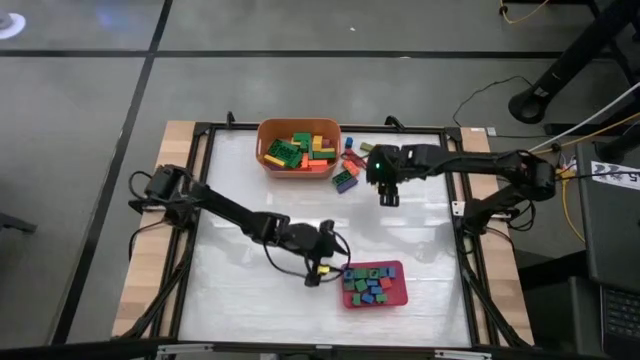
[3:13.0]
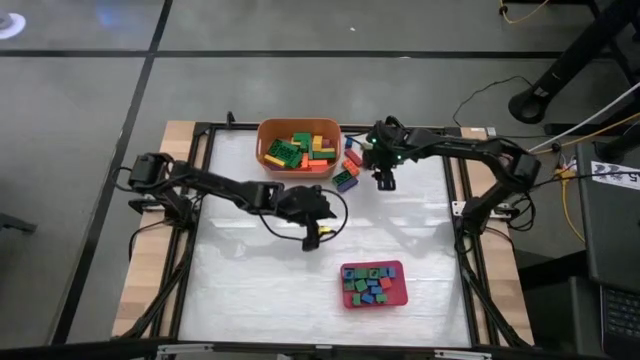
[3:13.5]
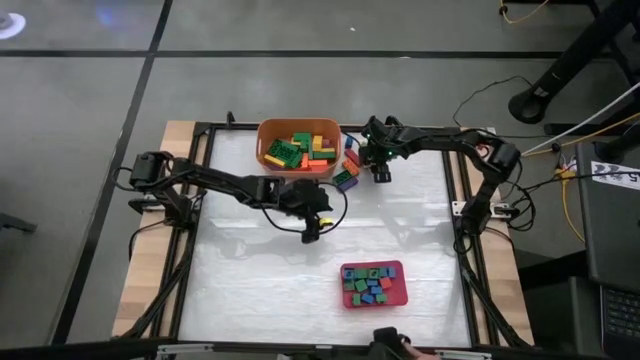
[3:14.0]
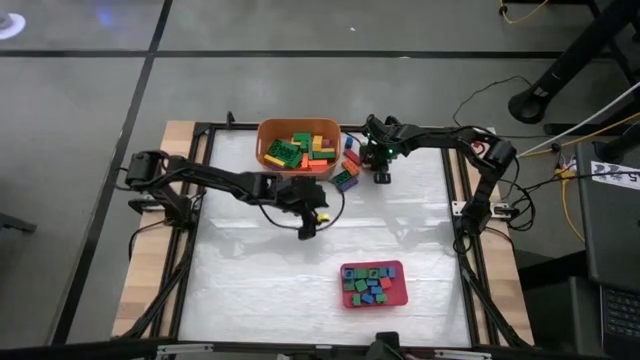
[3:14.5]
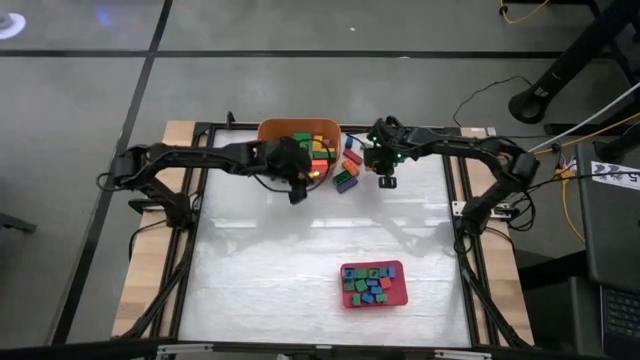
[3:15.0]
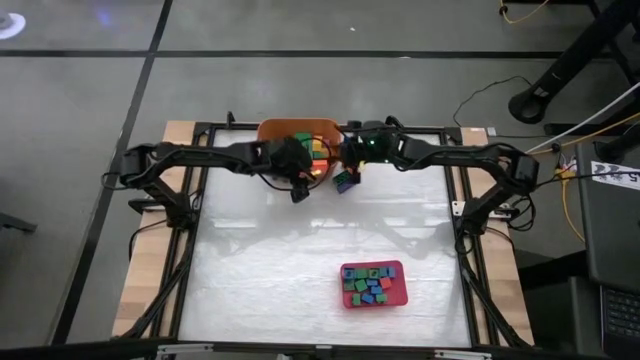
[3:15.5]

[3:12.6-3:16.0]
Task: Sort blocks by size
Put the large orange block into the orange bin

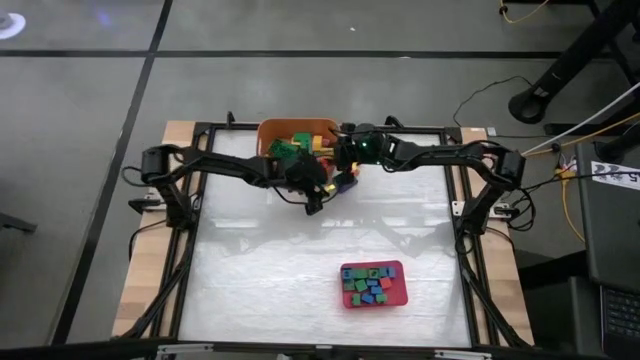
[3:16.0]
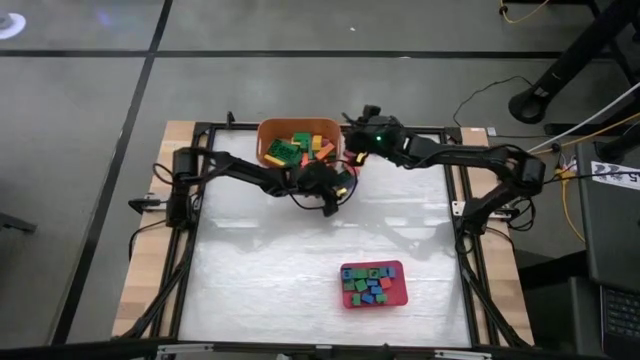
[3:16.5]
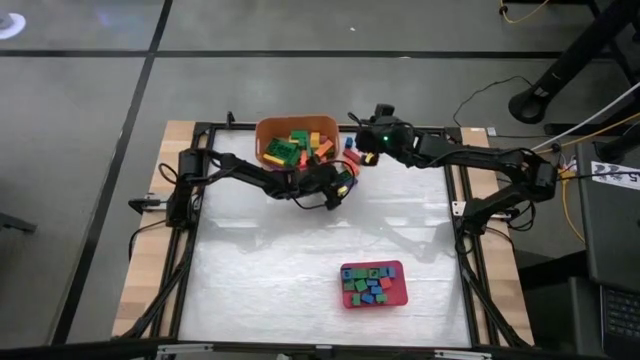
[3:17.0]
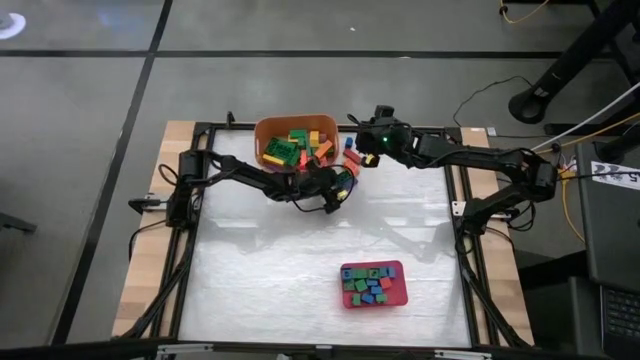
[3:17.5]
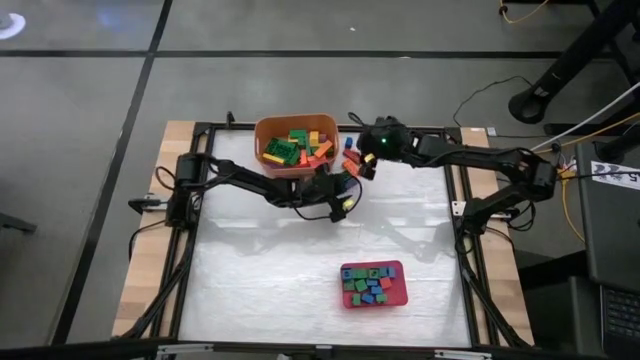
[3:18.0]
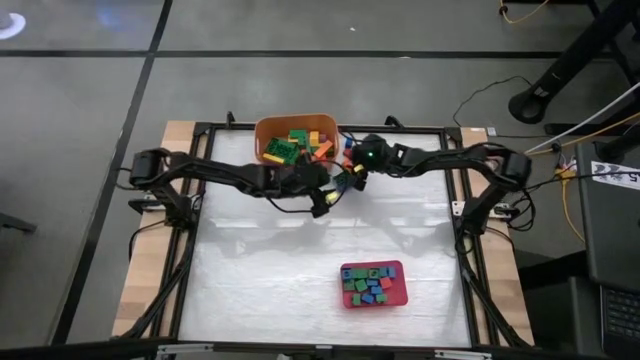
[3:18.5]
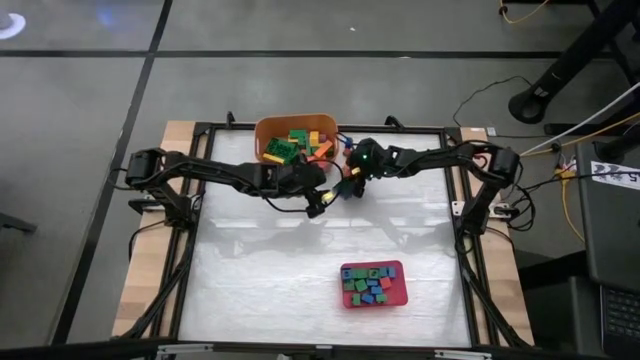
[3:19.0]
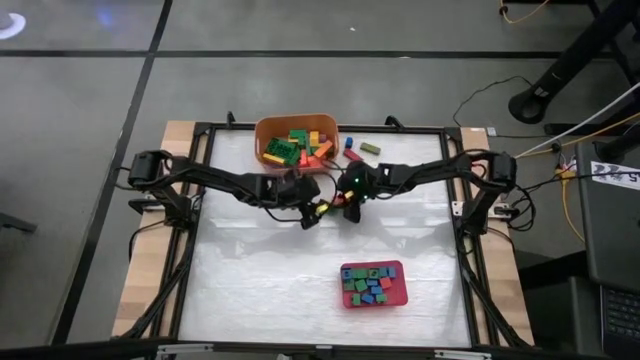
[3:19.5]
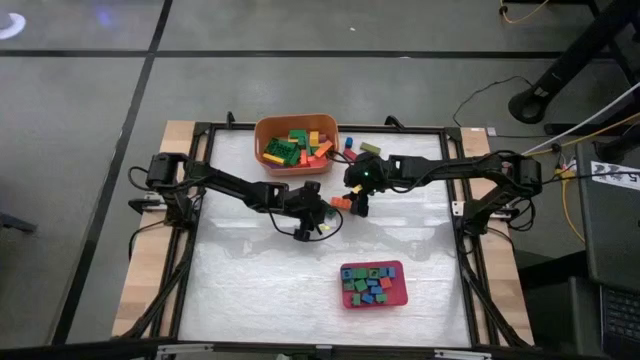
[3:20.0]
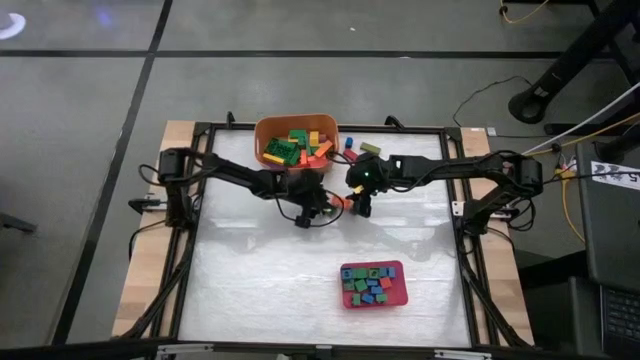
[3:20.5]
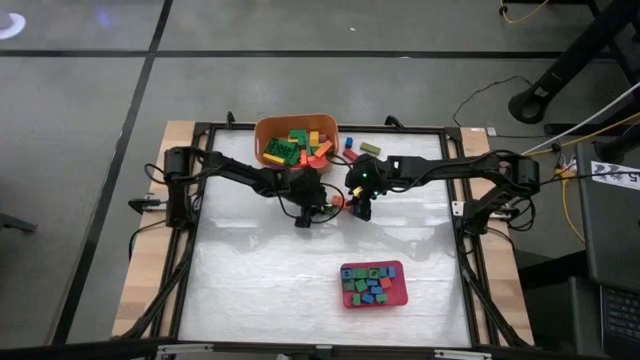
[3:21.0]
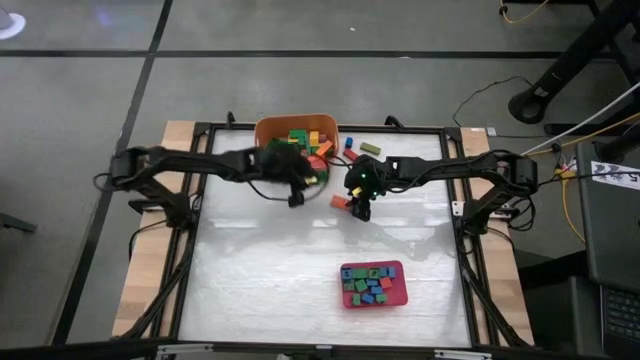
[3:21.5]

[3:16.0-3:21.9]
Put the large green game piece into the orange bin

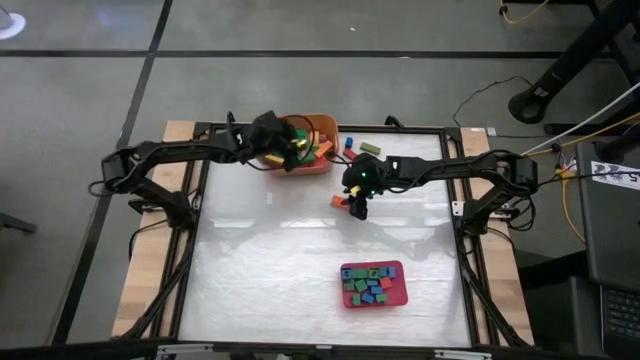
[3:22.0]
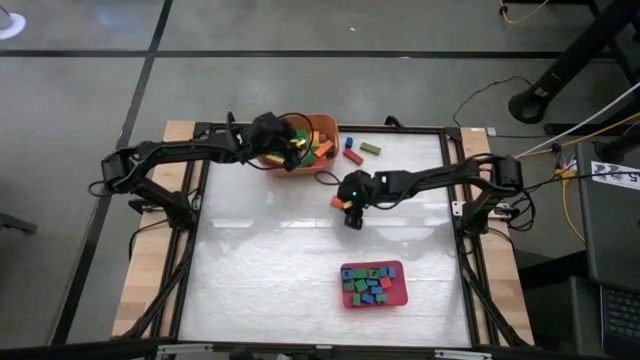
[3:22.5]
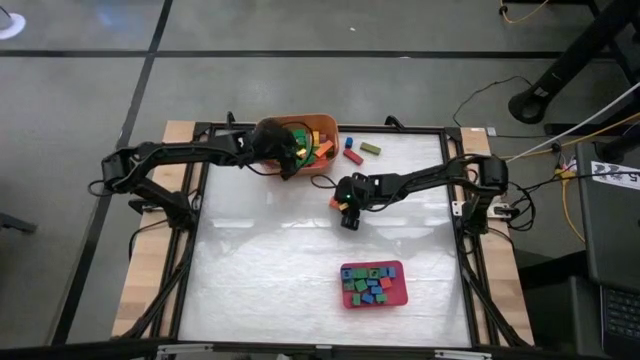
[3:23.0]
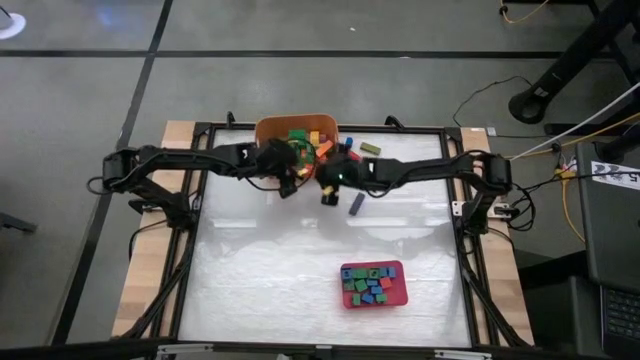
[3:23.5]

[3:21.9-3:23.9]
Put the large orange game piece into the orange bin

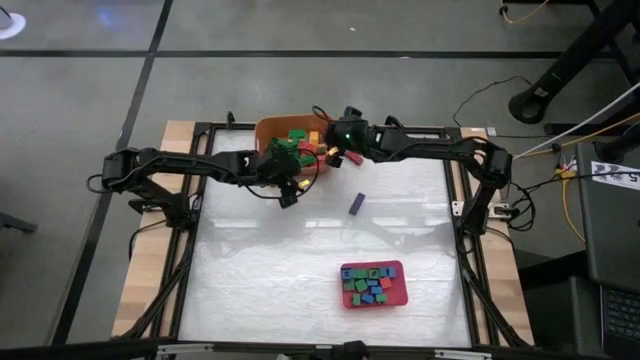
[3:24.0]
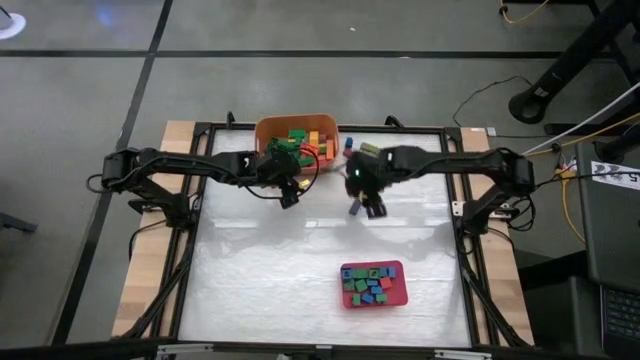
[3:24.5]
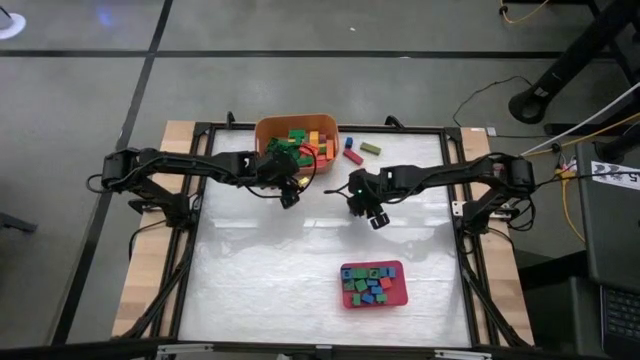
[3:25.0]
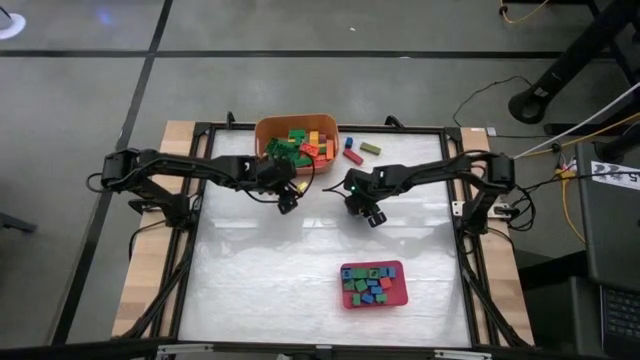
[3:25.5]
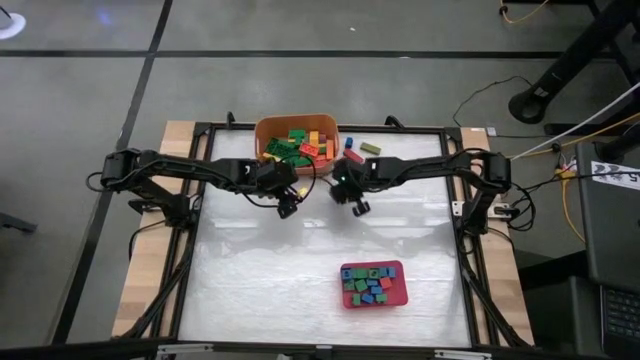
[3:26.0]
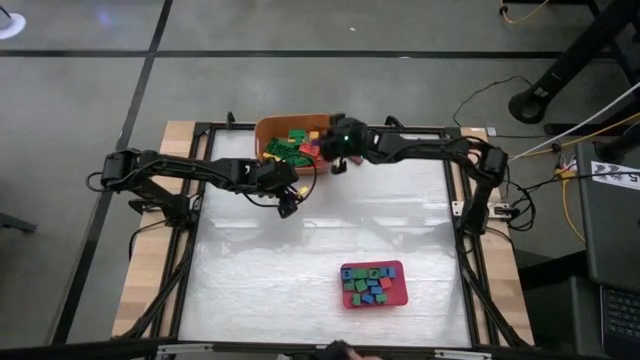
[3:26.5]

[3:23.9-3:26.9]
Put the large dark blue block into the orange bin

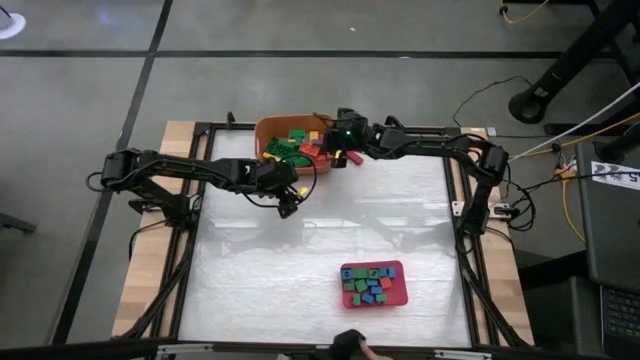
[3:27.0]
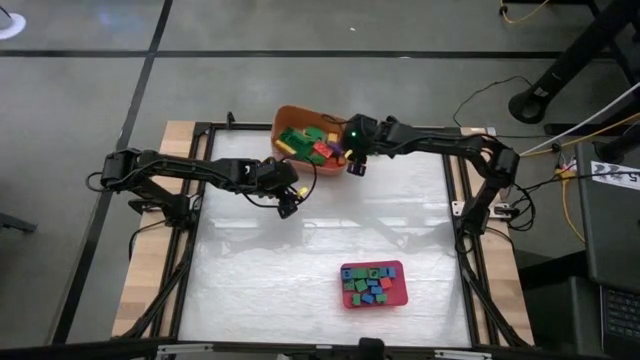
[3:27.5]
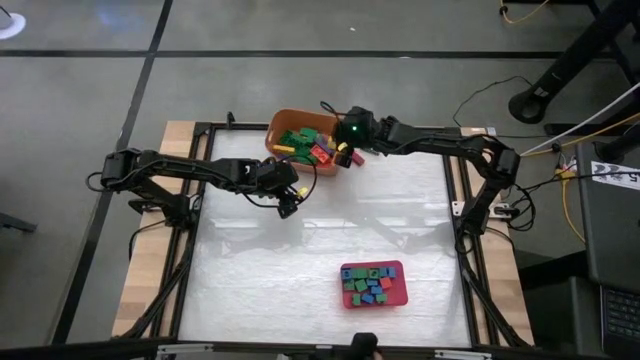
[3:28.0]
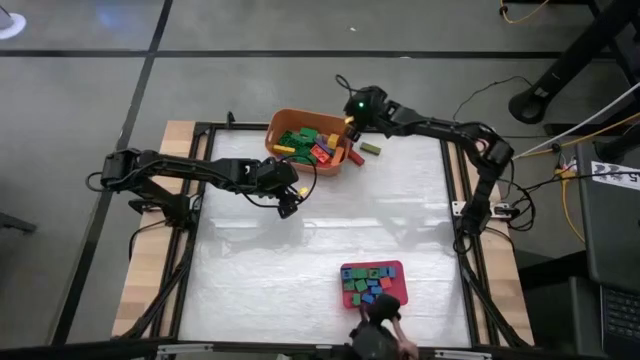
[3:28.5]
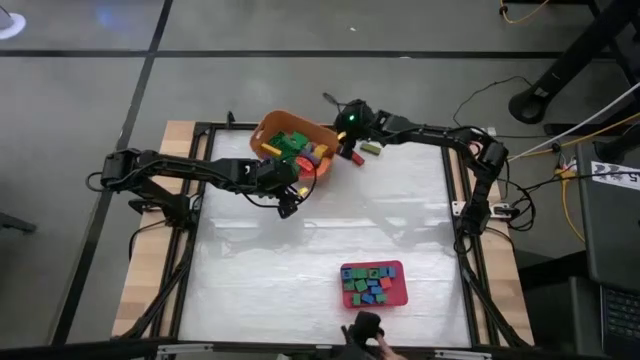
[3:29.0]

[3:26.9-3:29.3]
Adjust the orange bin

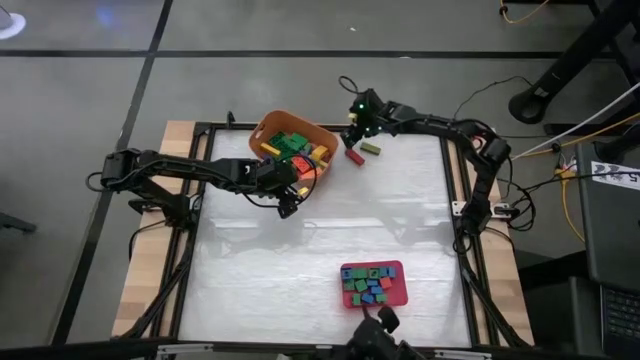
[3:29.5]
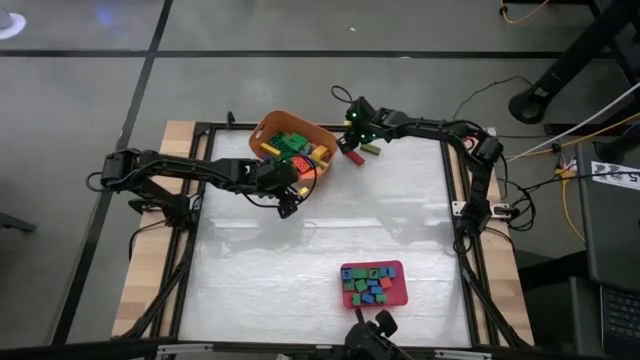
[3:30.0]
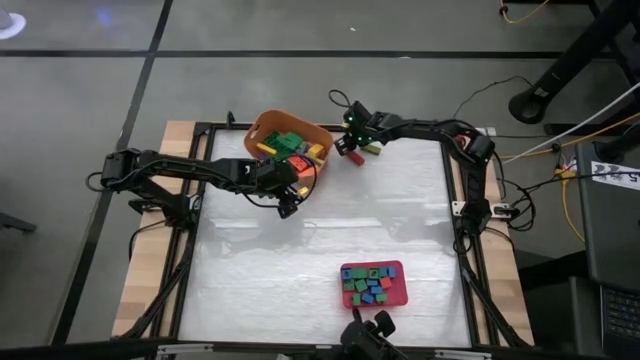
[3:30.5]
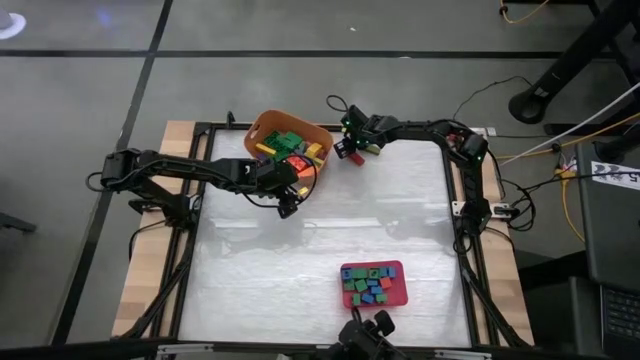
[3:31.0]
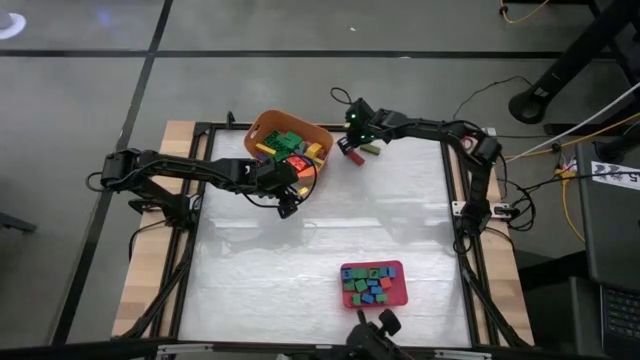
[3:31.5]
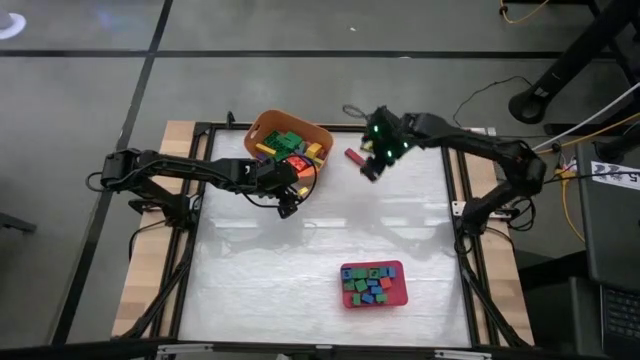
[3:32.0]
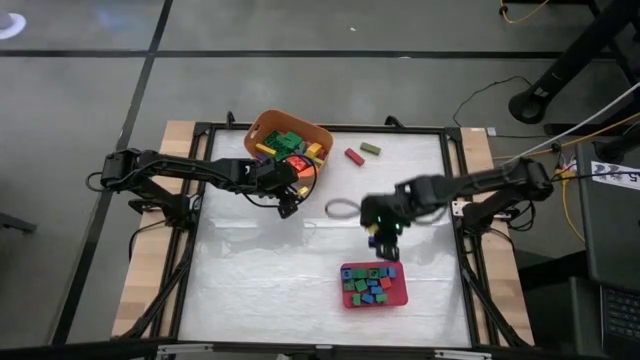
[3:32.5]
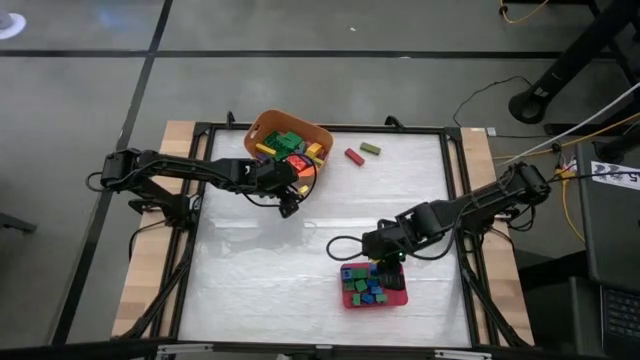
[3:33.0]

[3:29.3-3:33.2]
Put the small blue game piece into the red bin
